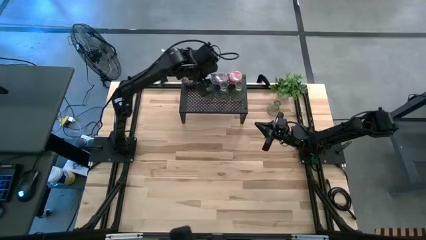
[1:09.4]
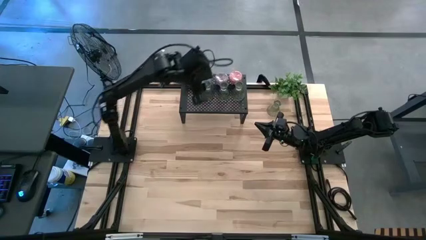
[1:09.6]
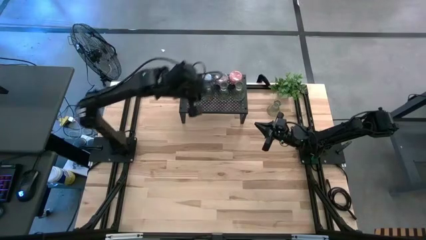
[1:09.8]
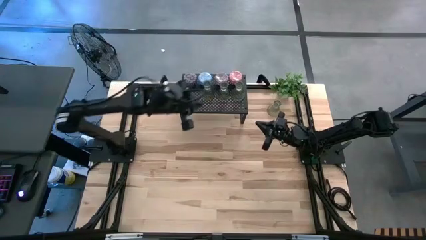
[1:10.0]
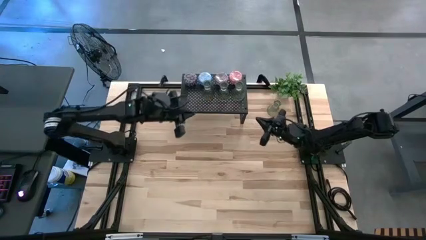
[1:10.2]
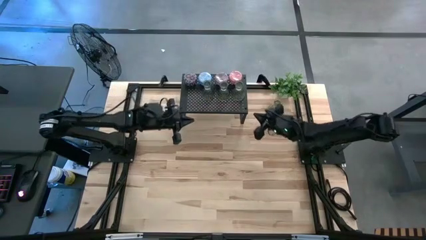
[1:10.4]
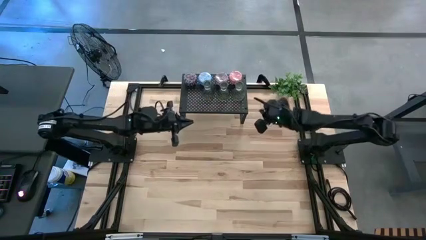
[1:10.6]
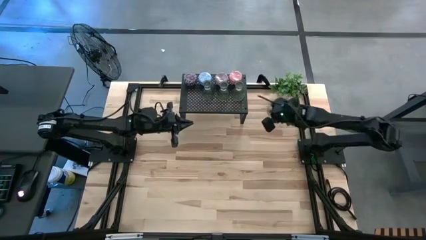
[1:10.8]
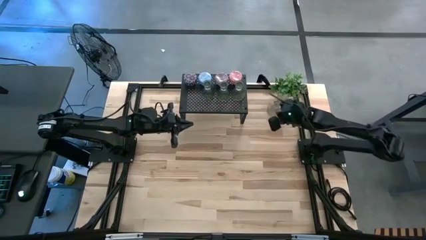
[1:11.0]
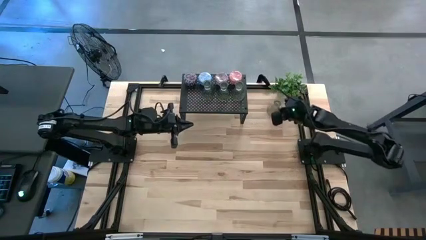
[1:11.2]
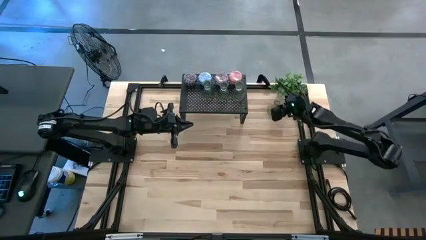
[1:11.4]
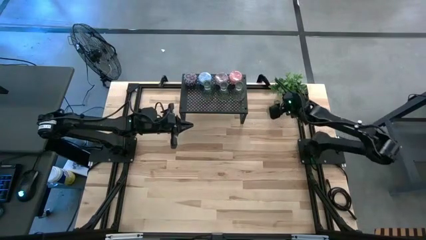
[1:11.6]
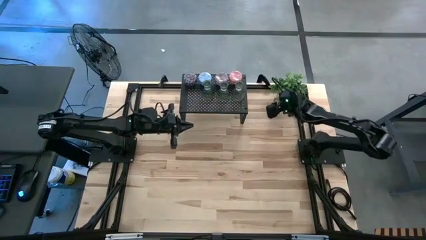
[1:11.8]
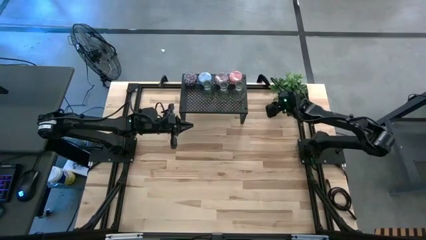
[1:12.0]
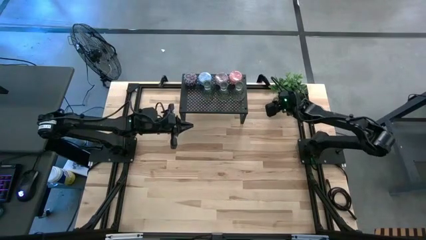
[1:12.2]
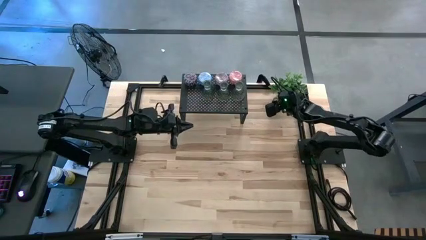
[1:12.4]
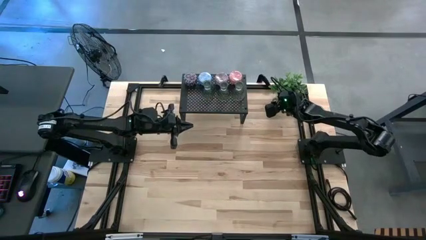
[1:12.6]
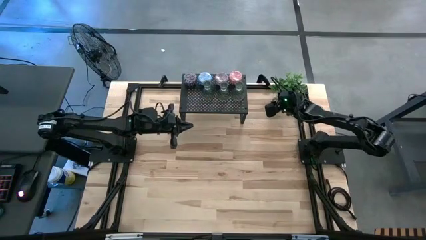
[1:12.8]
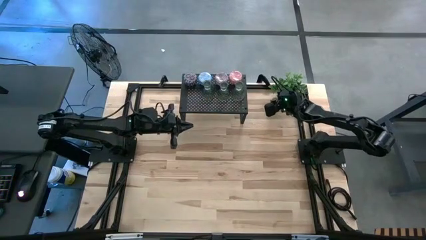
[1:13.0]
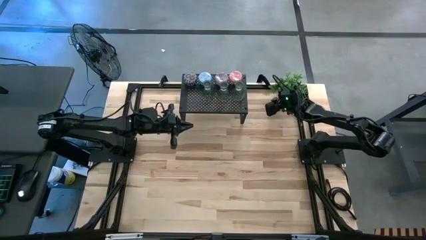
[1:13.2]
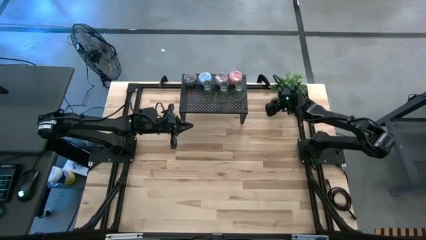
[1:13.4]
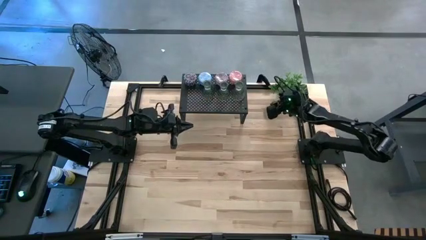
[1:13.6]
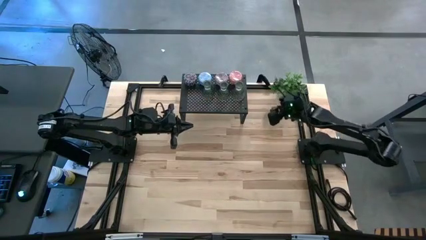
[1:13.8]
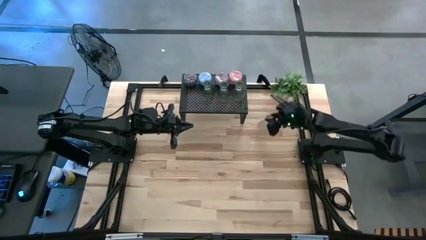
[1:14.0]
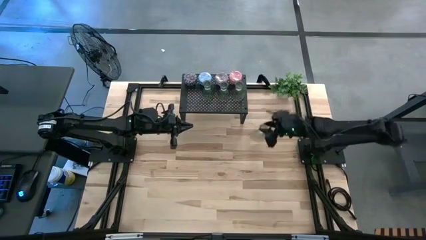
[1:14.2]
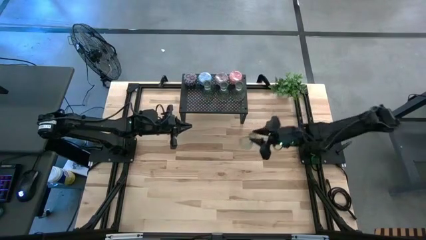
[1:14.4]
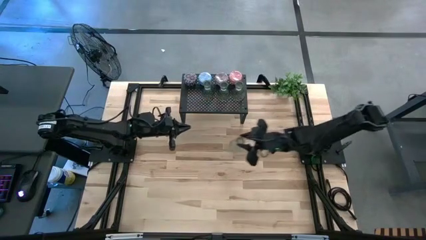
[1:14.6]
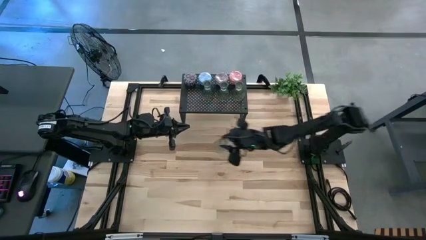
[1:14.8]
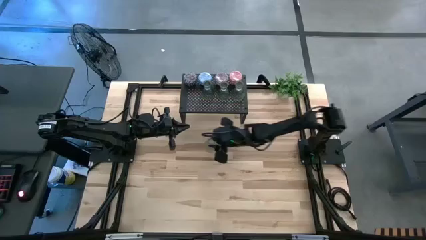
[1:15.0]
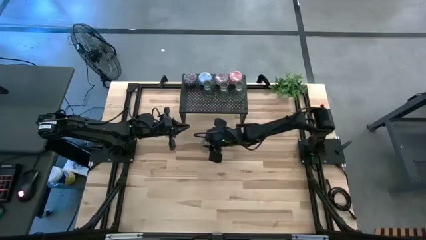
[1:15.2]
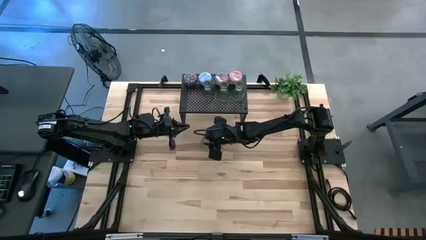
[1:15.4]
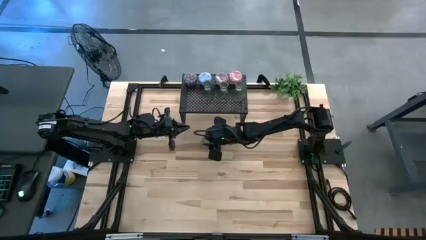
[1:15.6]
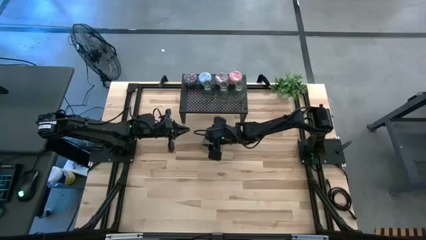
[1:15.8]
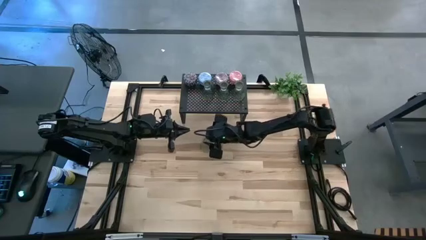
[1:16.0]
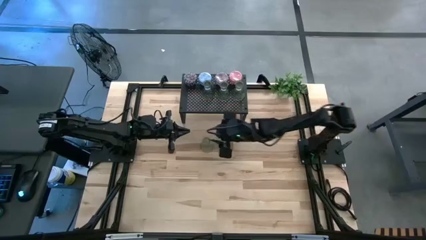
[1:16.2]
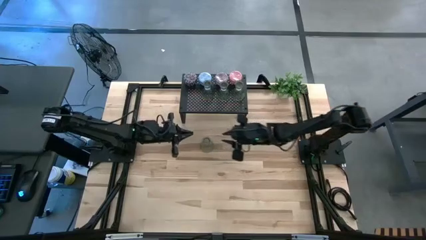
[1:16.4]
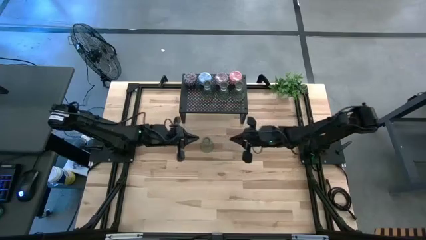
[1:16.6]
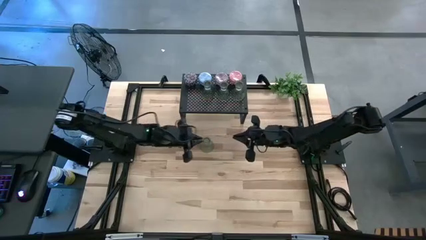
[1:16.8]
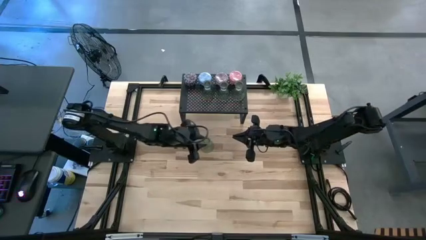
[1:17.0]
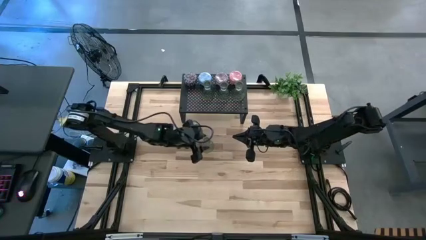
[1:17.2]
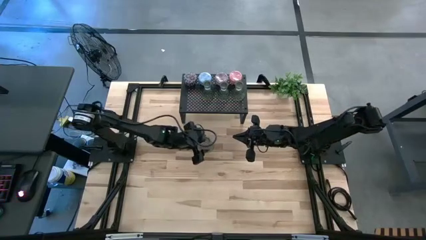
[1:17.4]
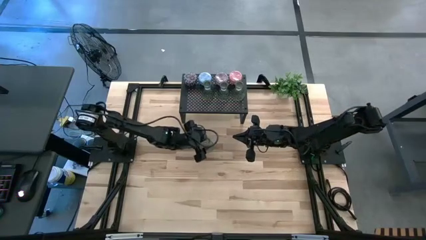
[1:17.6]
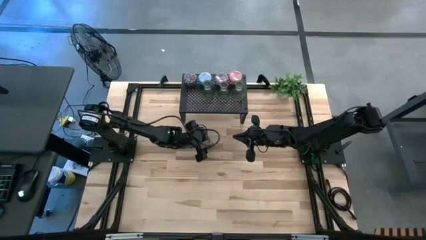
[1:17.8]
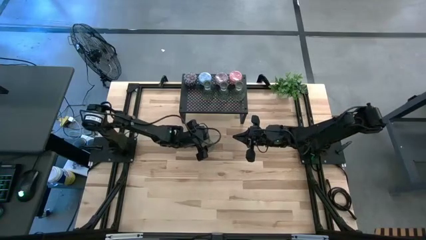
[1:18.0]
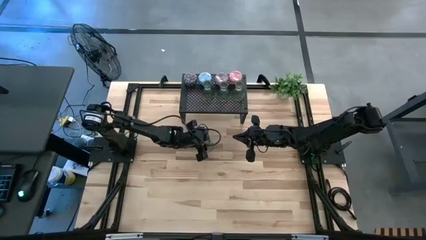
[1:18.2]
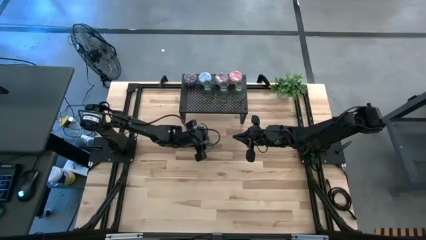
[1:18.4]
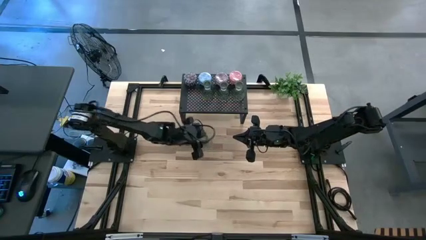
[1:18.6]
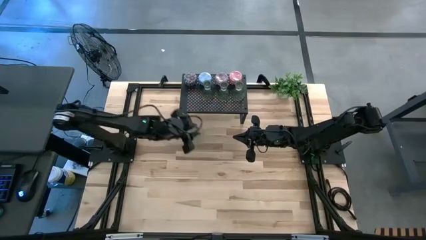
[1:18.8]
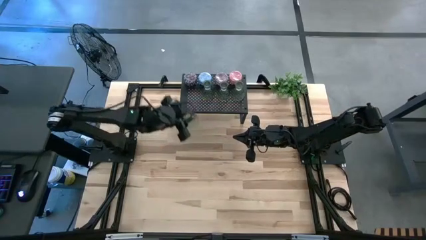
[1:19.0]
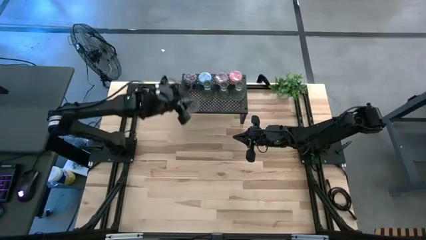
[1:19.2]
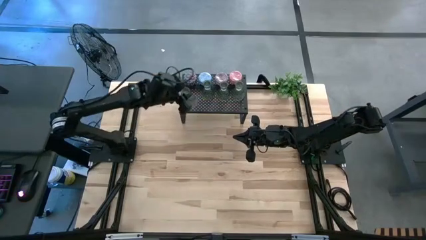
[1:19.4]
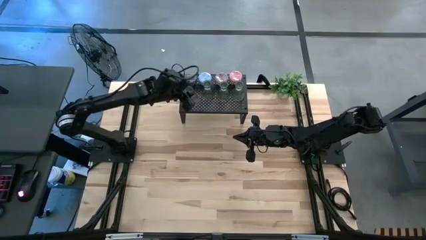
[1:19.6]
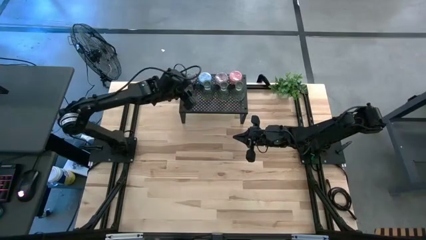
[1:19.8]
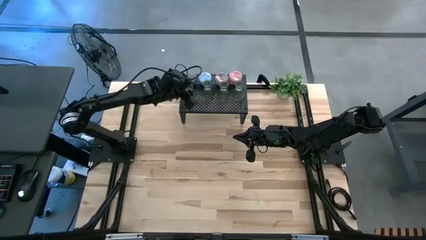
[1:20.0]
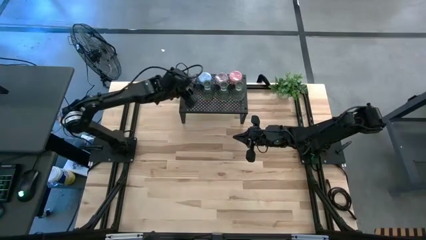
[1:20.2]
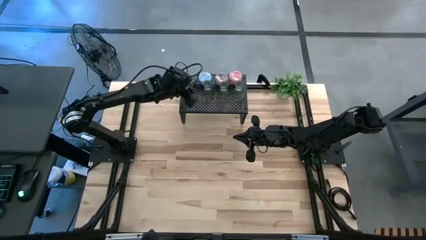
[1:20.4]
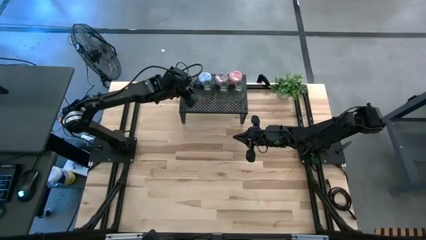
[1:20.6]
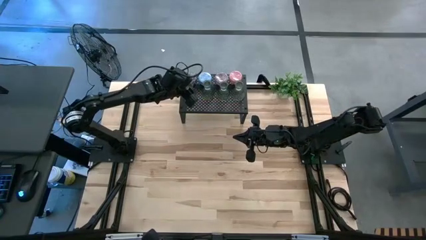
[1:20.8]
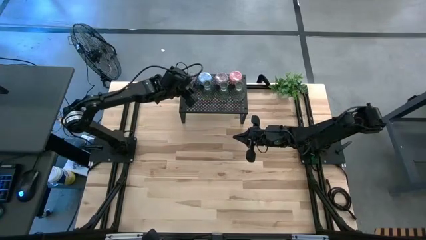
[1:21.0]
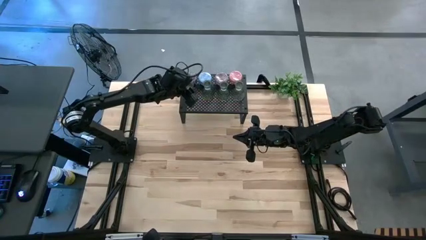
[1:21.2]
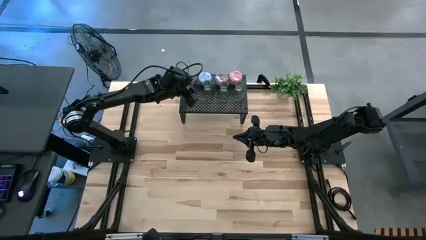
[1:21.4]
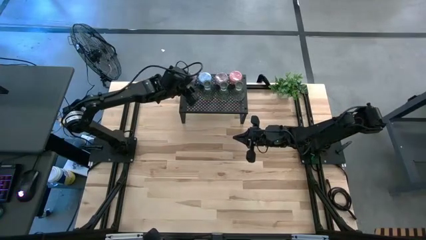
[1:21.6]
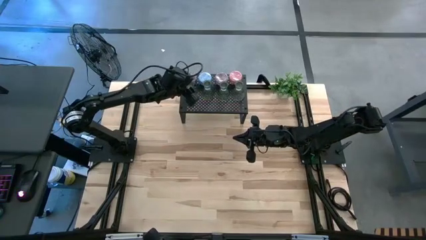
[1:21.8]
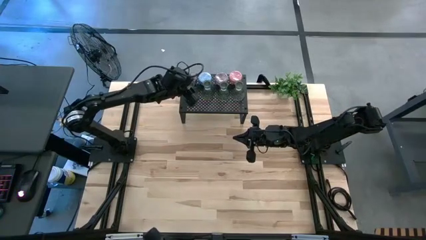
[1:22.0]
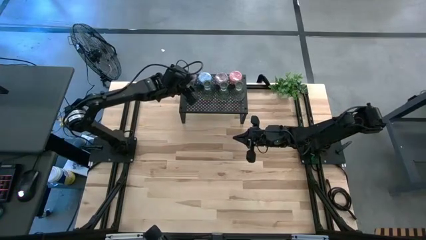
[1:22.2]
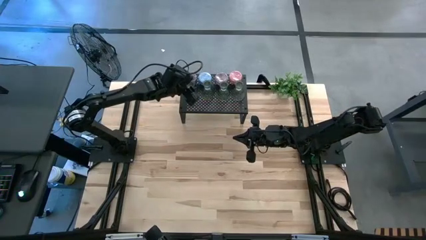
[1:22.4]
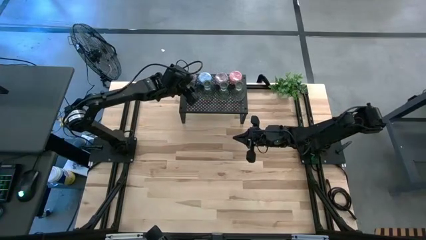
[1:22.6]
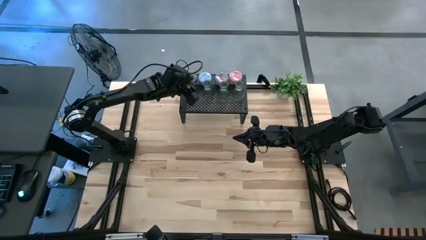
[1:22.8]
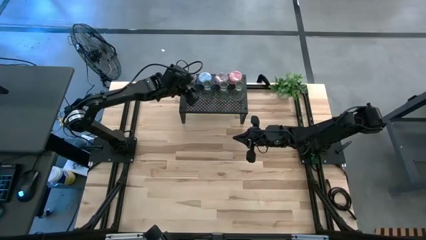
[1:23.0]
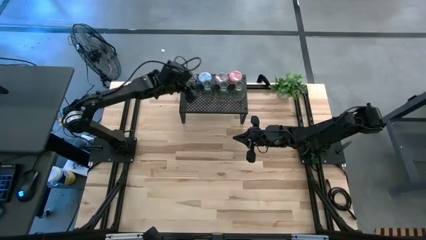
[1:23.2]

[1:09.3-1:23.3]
Task: Pick & Place candle stick holders
Align the candle holder with the other candle holder on the shelf

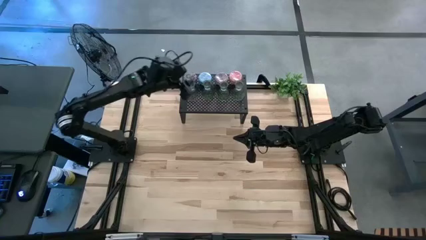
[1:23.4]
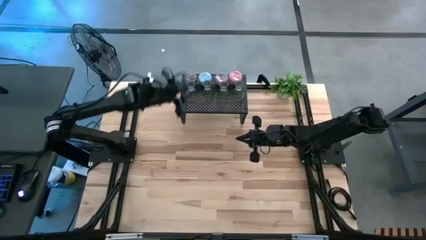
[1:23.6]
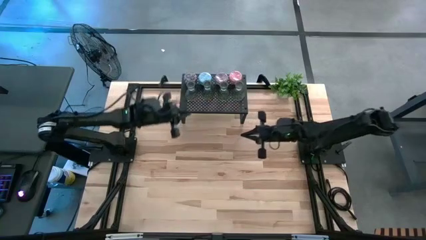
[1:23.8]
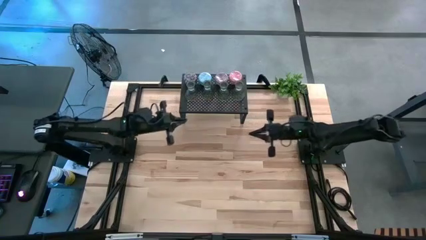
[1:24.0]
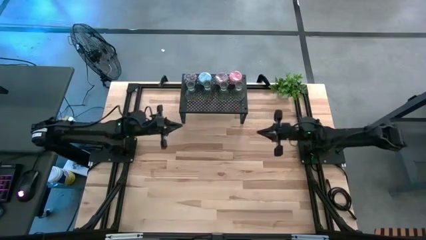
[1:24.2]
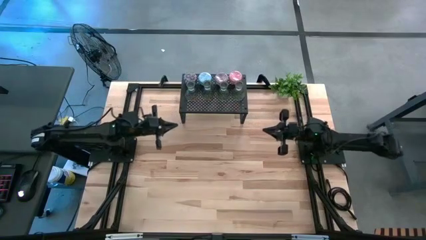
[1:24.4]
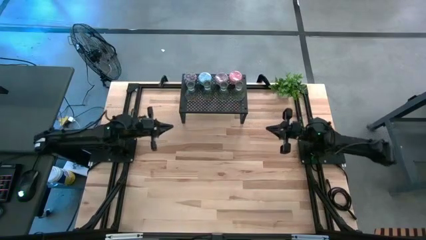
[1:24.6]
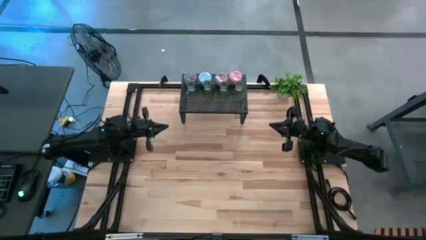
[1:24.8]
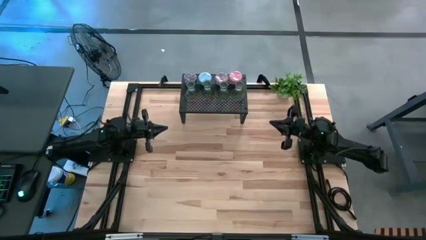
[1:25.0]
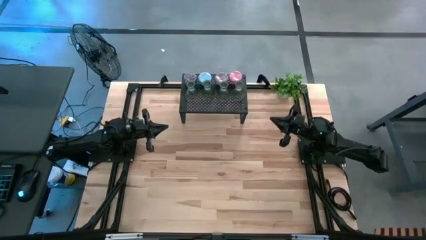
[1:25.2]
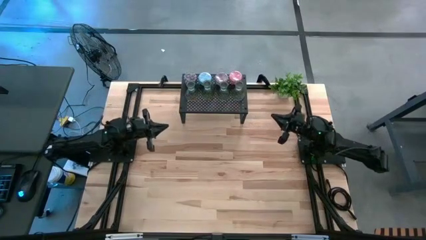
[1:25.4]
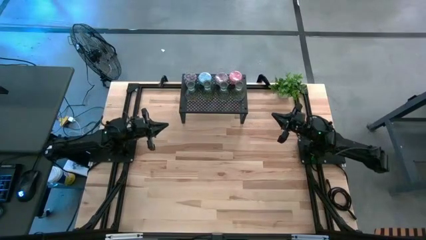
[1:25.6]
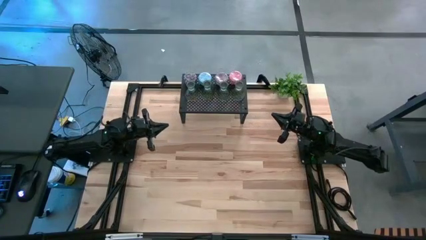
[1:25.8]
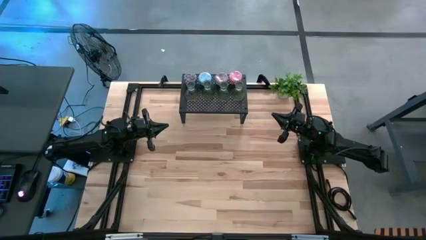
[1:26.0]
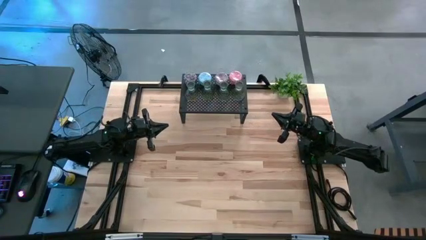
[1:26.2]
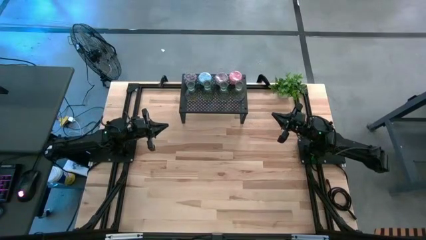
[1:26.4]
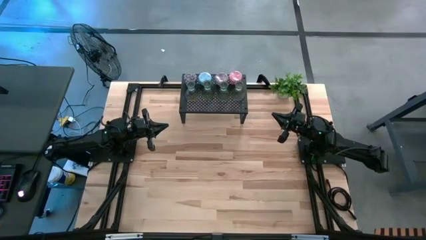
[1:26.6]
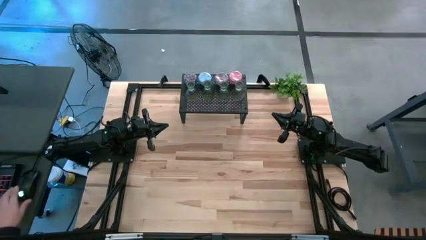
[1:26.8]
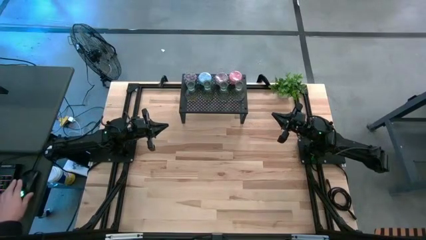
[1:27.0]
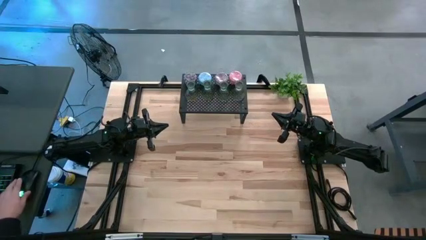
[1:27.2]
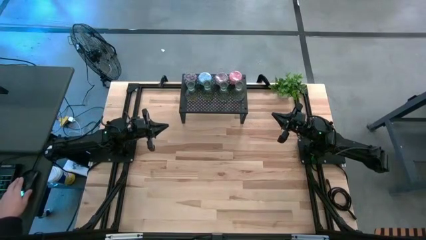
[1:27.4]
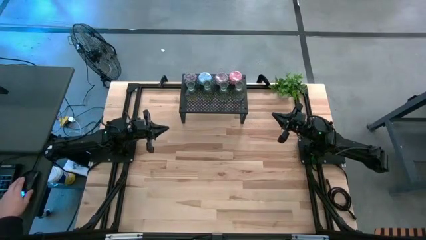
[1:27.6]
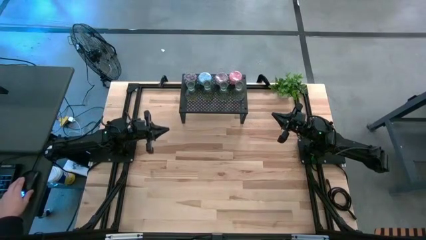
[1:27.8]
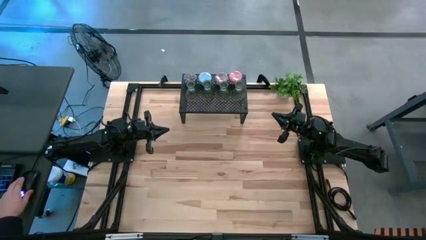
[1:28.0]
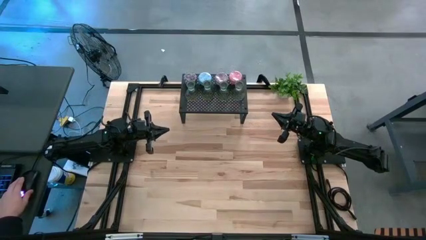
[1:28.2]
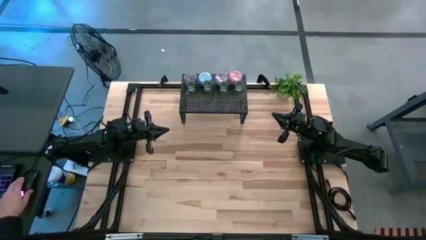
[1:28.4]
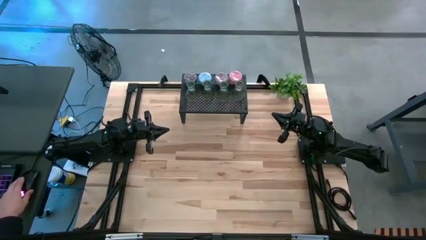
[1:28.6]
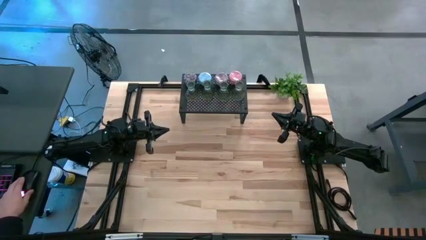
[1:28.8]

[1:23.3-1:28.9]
Return to Home Position
